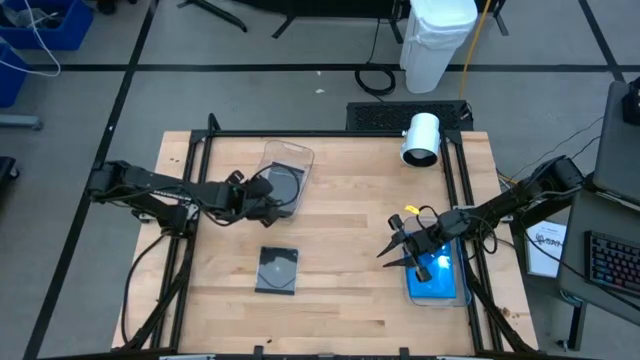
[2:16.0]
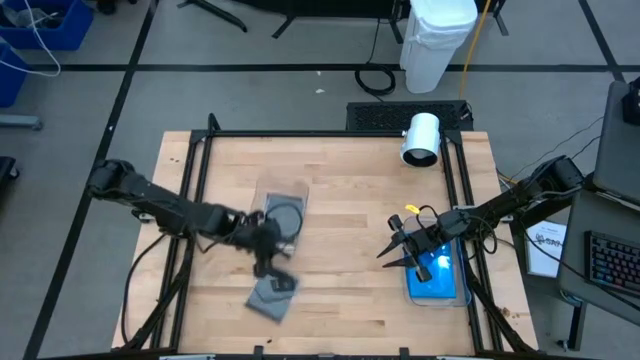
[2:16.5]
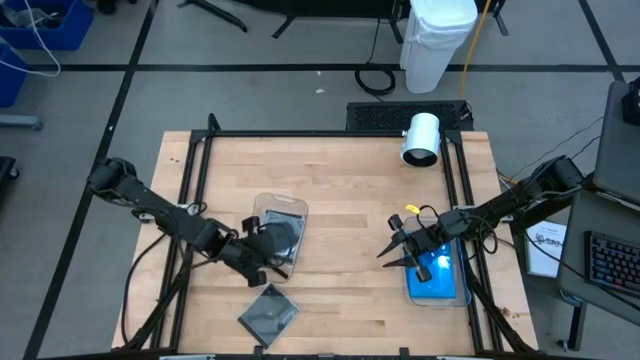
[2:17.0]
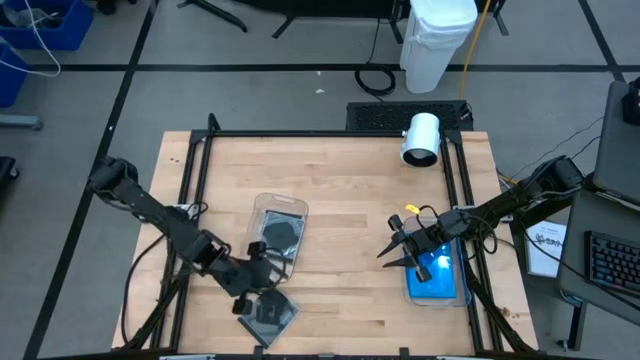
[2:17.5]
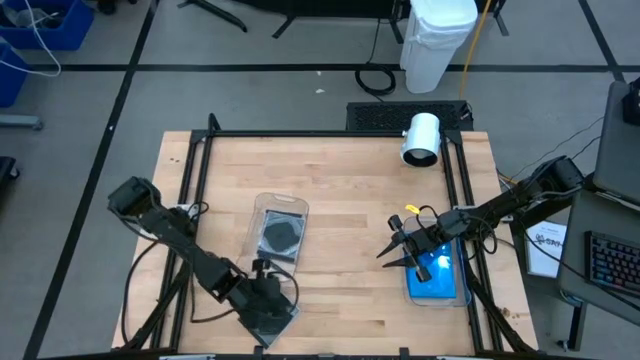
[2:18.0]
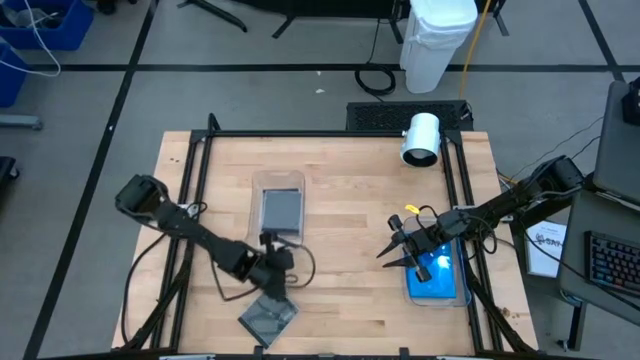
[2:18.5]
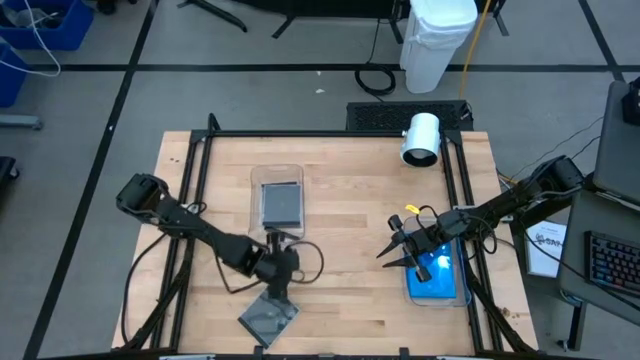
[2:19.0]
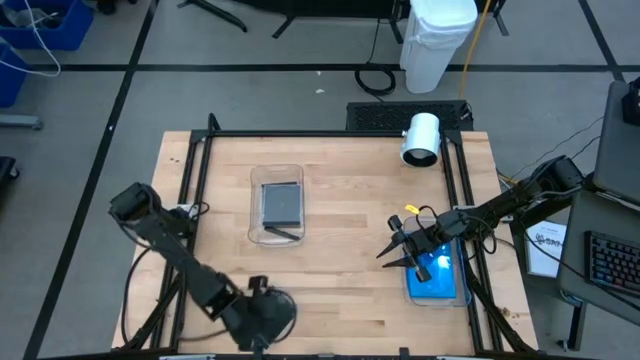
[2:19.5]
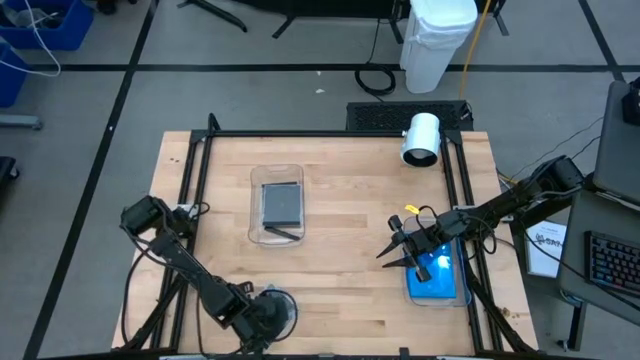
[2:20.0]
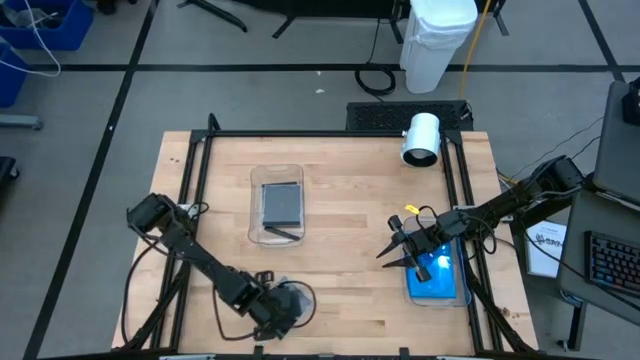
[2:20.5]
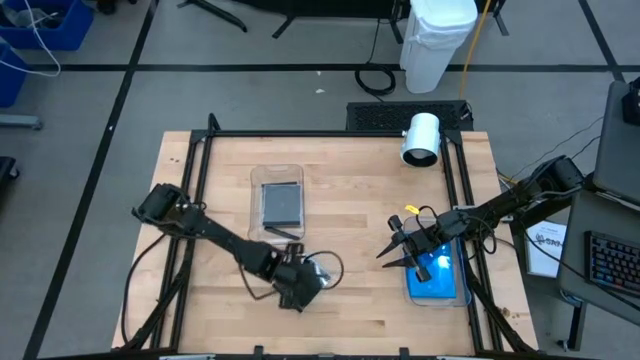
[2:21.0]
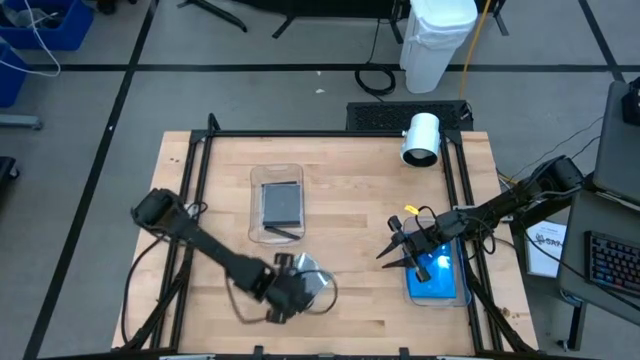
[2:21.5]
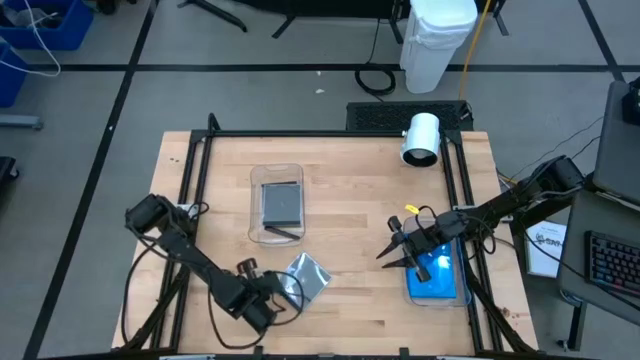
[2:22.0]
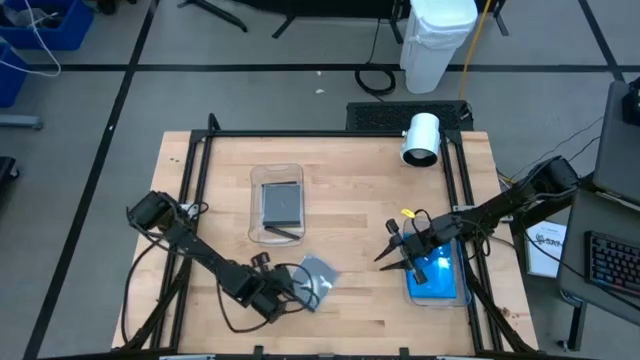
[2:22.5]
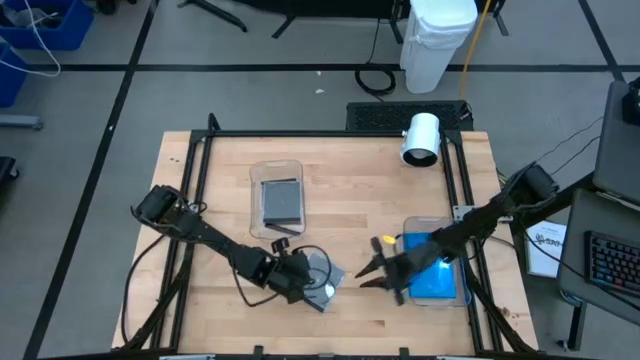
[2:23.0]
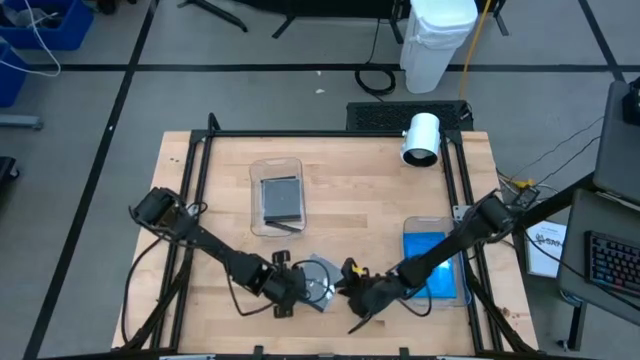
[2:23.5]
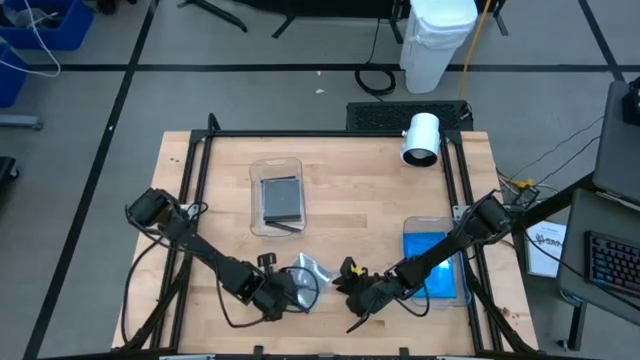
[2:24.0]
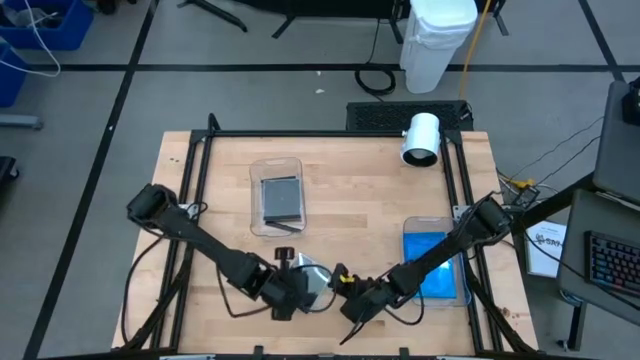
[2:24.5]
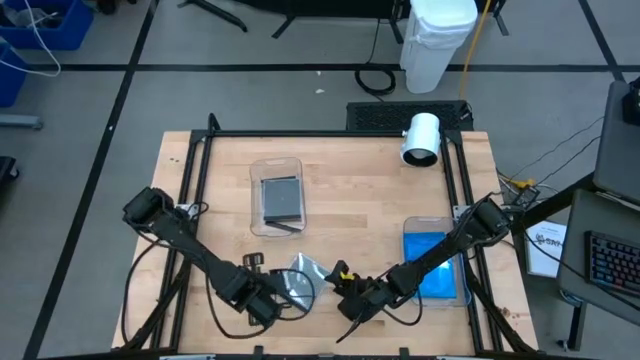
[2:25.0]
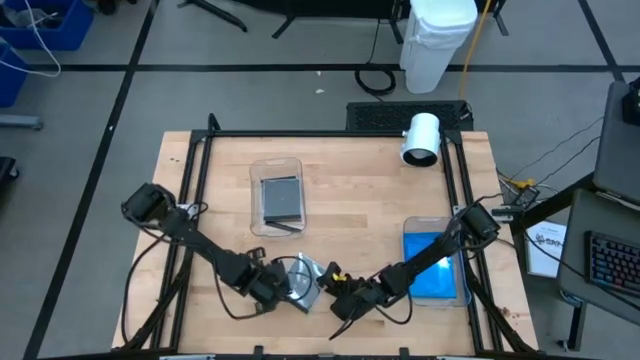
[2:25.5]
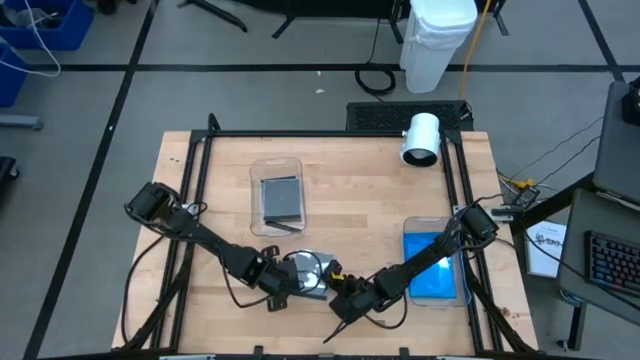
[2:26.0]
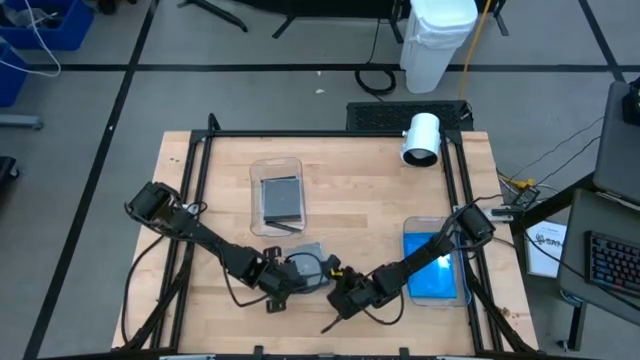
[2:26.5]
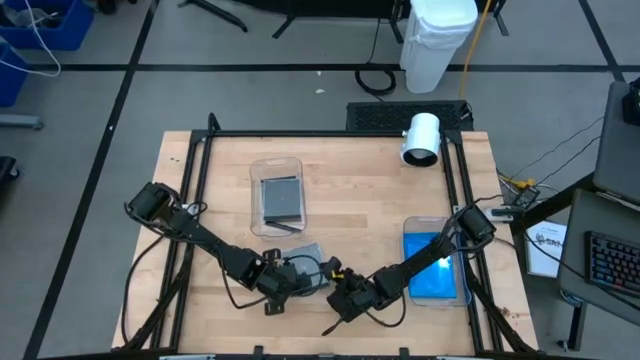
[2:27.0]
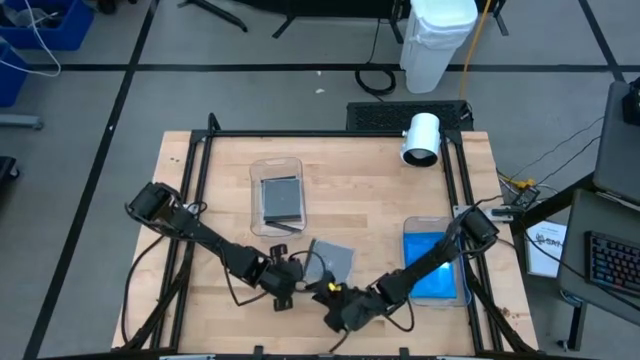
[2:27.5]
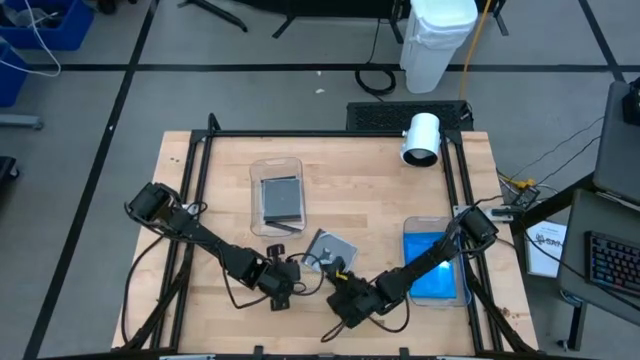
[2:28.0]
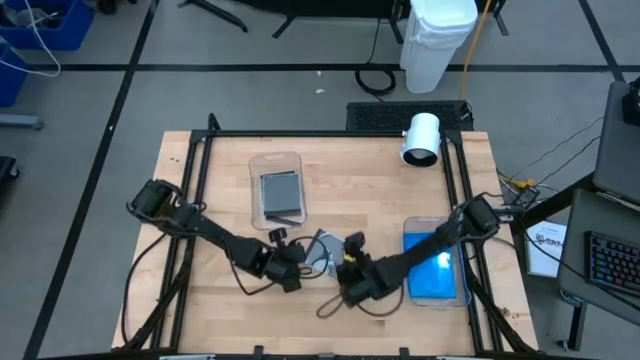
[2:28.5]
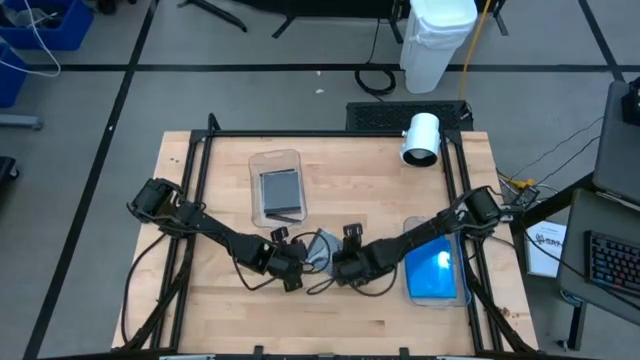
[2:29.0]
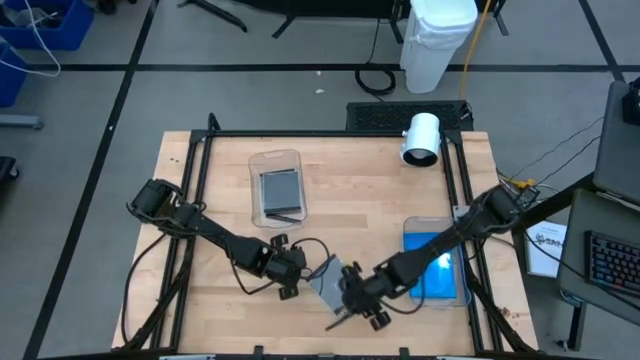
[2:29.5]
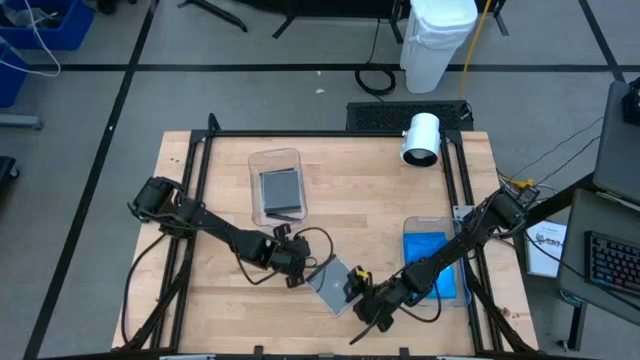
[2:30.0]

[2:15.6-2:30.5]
Task: Pick & place jewel cases by type
Put the black disc case into the left transparent bin

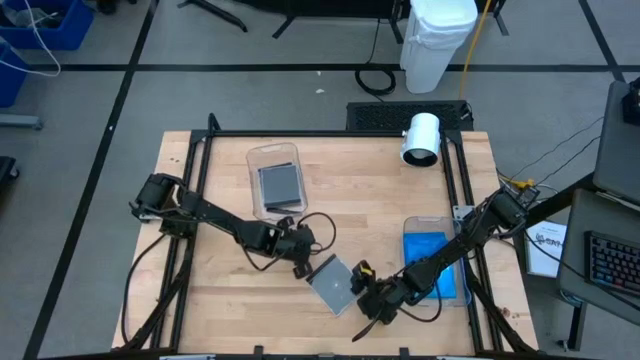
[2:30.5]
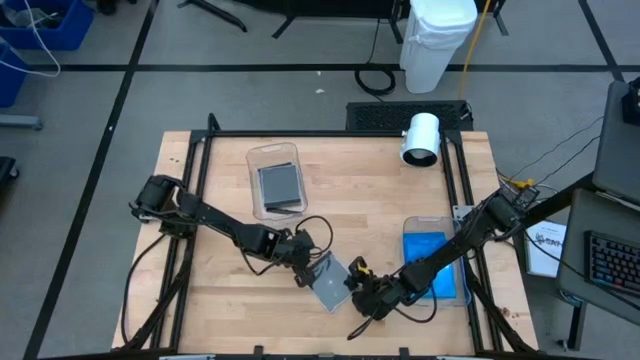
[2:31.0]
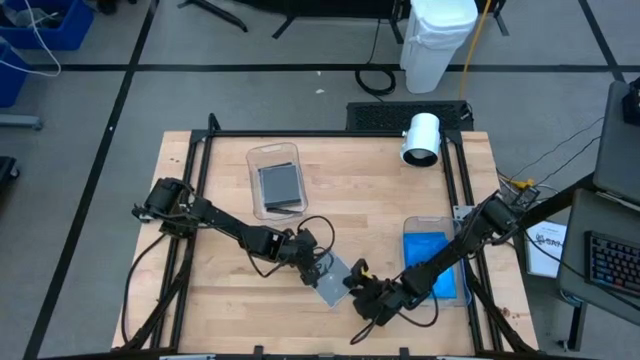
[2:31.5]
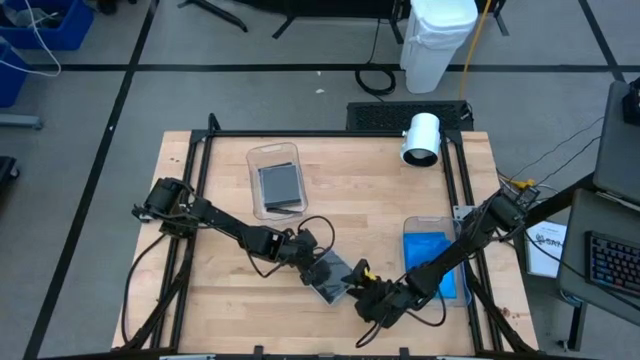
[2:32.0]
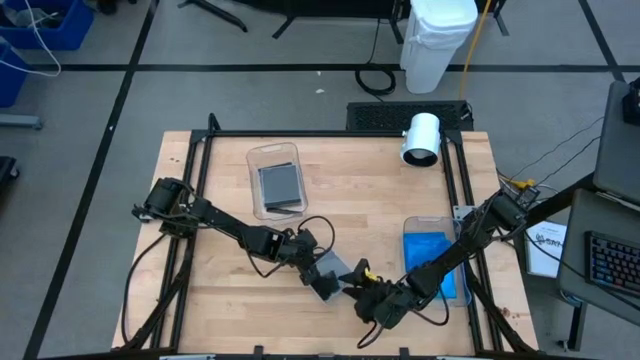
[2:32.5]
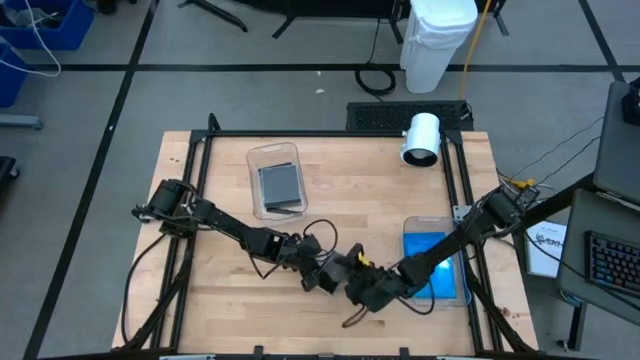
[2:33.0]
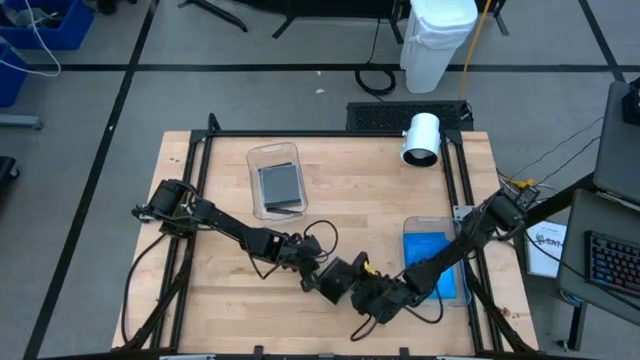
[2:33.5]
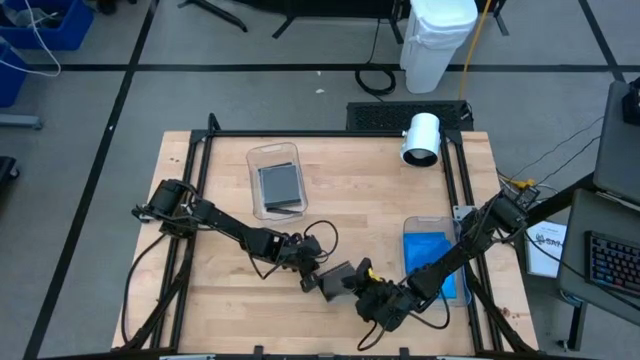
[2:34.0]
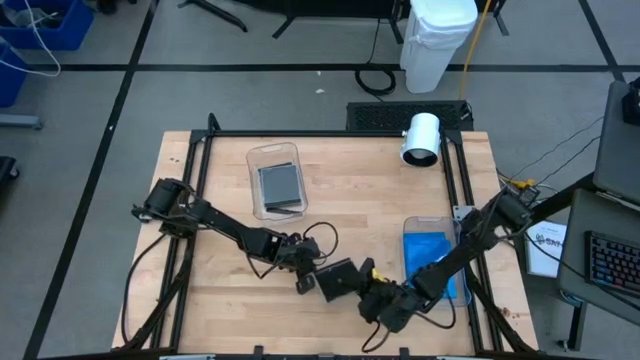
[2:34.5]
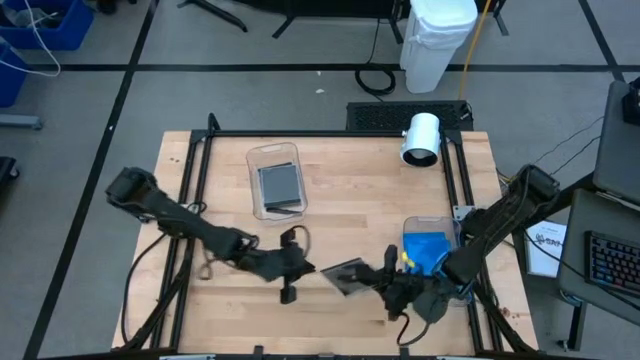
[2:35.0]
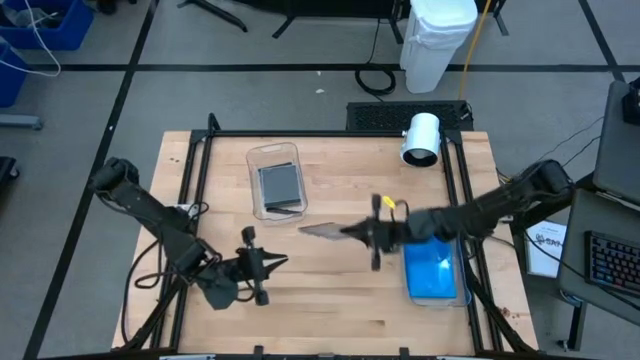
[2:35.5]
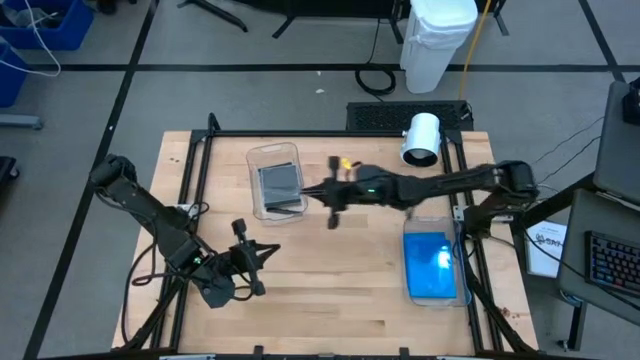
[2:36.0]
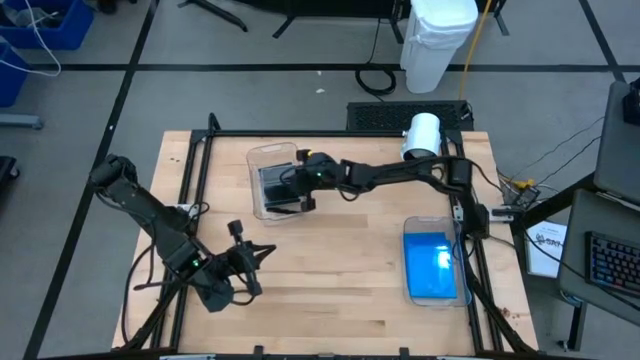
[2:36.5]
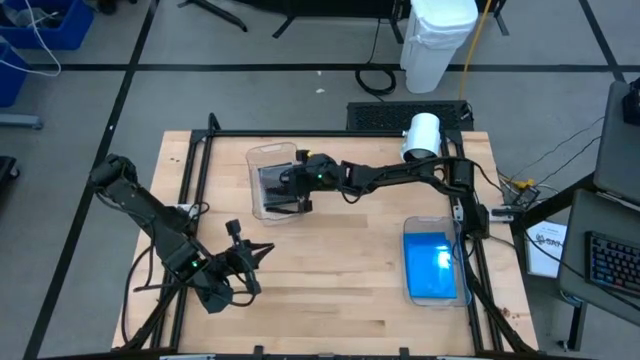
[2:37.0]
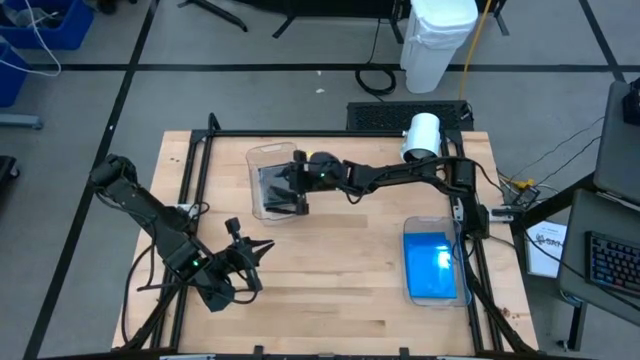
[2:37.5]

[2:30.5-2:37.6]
Put the black disc case into the left transparent bin
